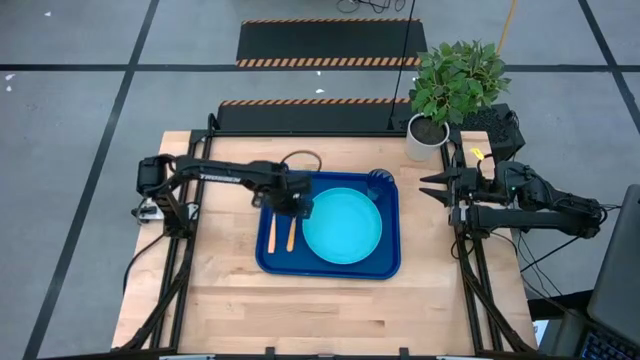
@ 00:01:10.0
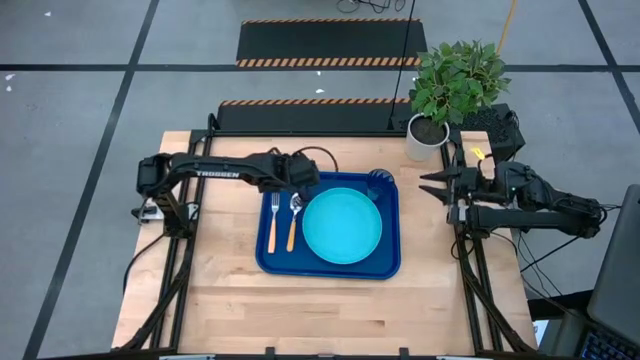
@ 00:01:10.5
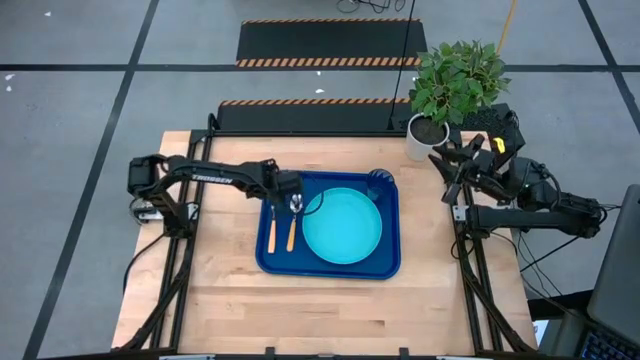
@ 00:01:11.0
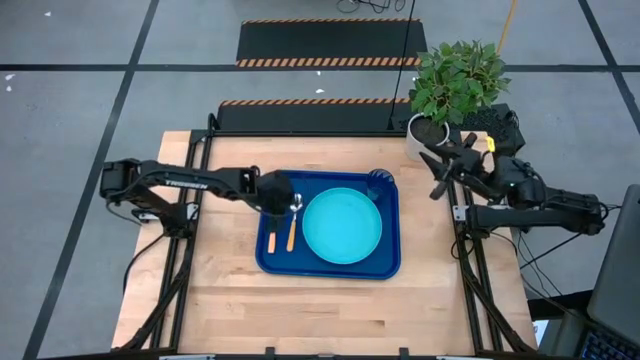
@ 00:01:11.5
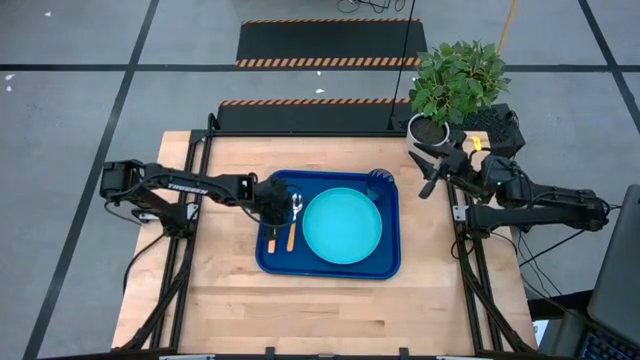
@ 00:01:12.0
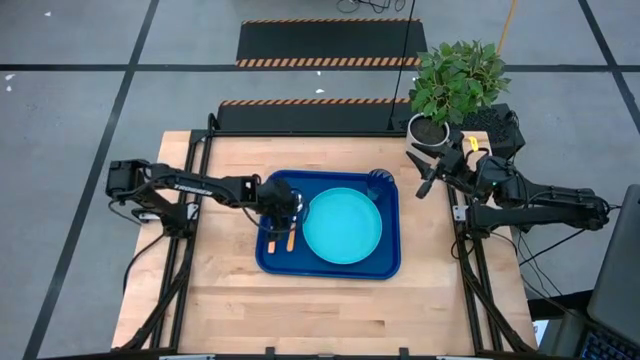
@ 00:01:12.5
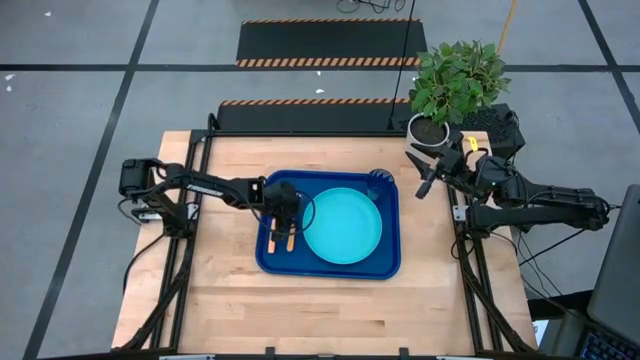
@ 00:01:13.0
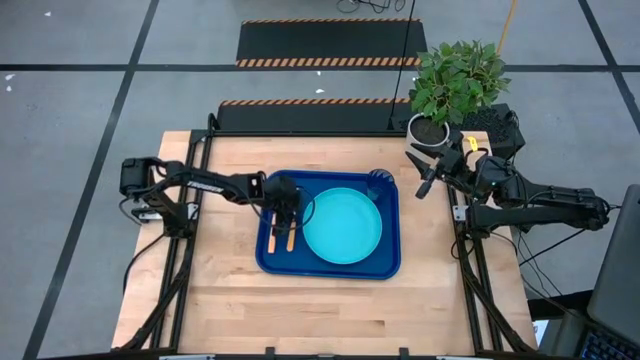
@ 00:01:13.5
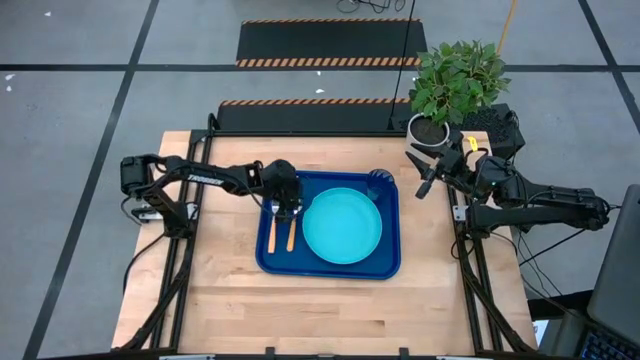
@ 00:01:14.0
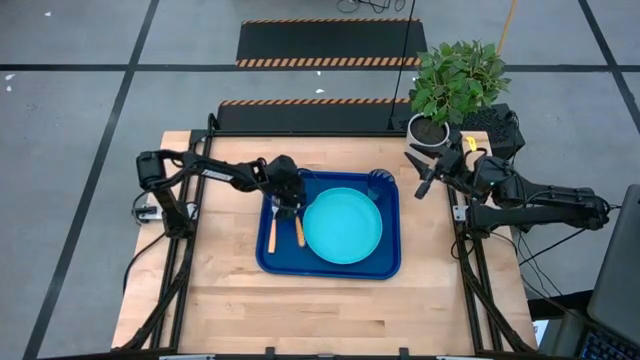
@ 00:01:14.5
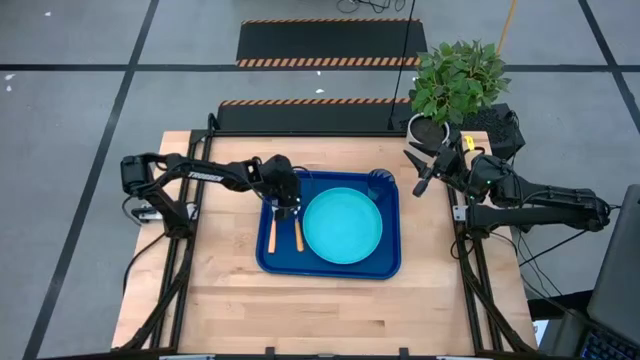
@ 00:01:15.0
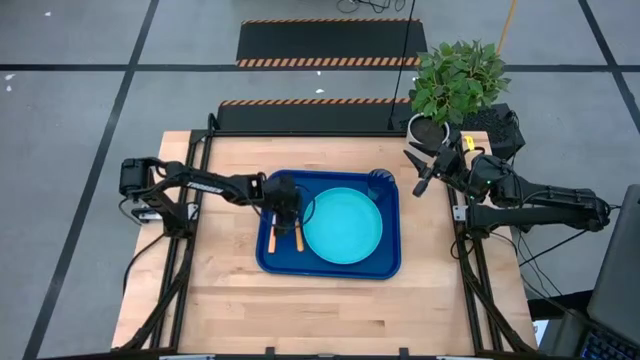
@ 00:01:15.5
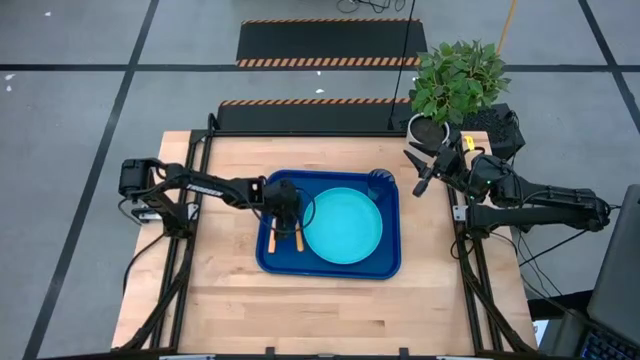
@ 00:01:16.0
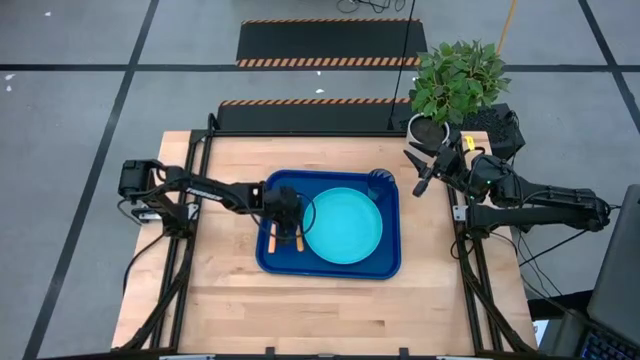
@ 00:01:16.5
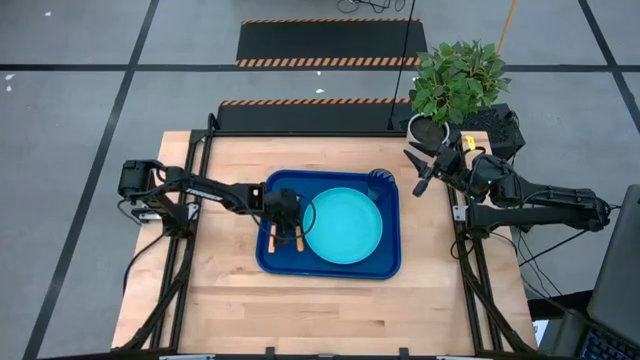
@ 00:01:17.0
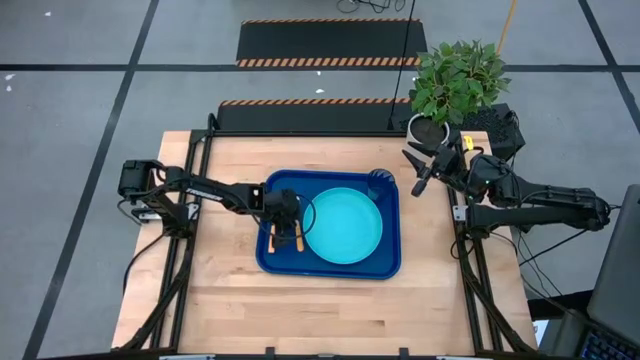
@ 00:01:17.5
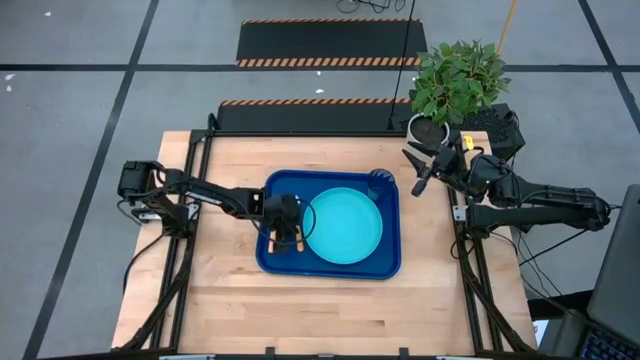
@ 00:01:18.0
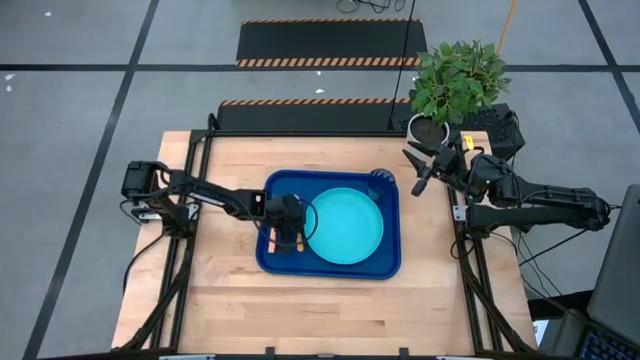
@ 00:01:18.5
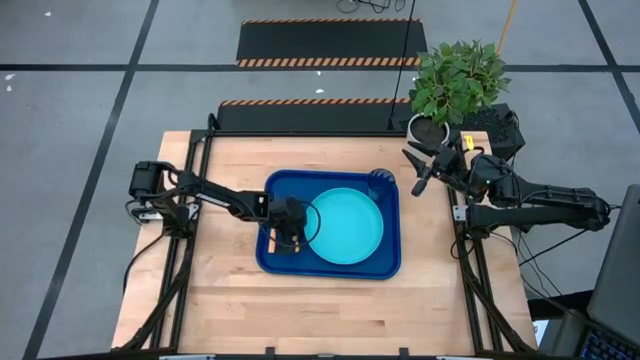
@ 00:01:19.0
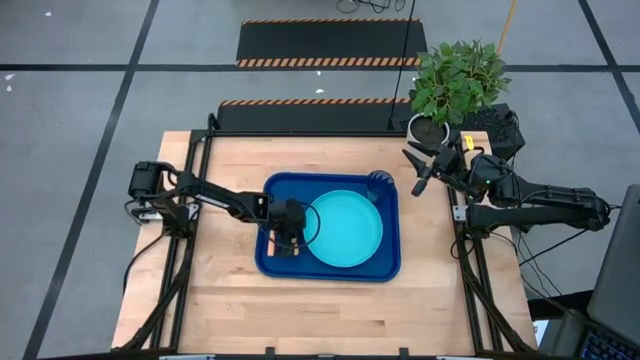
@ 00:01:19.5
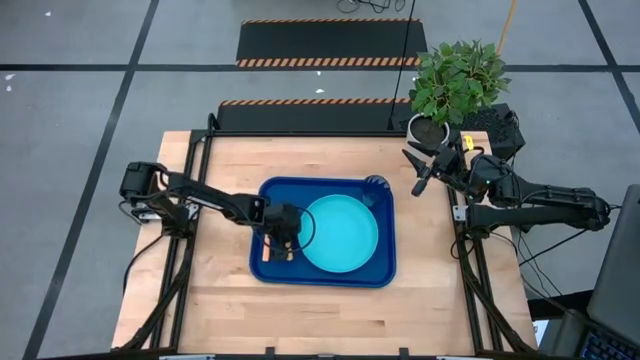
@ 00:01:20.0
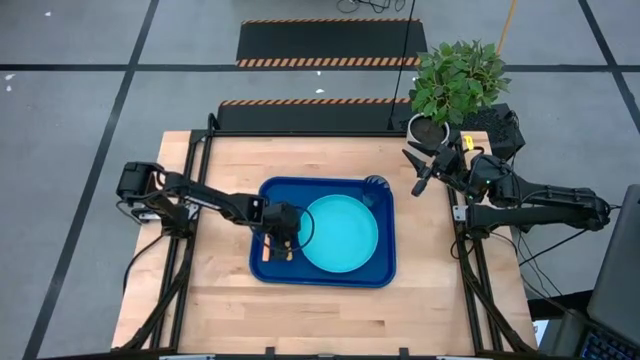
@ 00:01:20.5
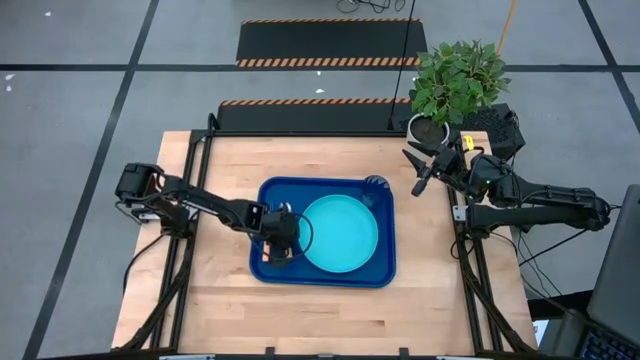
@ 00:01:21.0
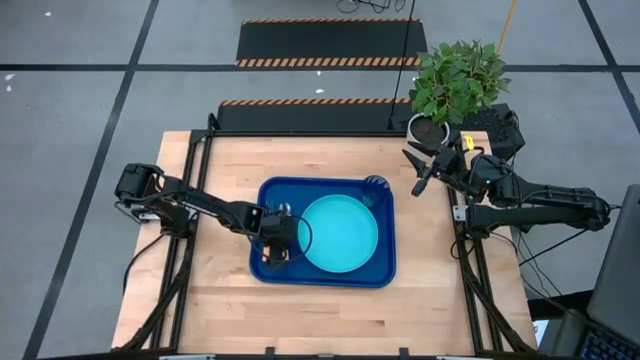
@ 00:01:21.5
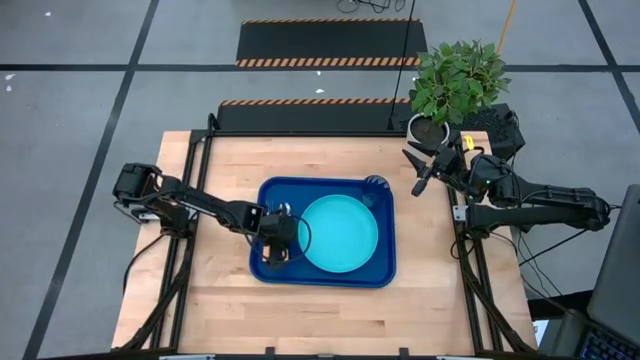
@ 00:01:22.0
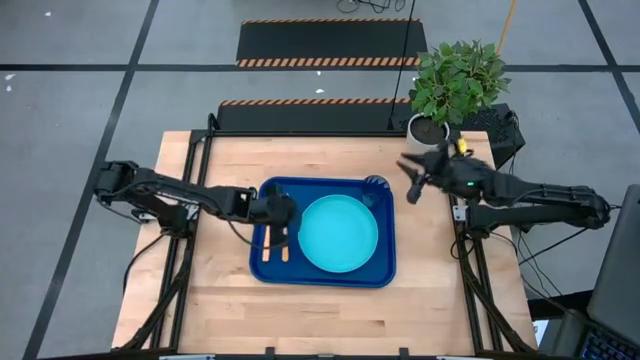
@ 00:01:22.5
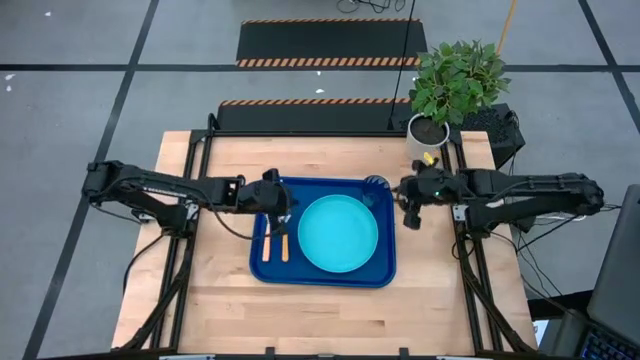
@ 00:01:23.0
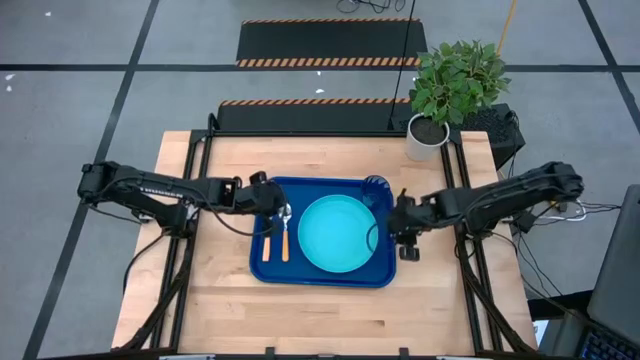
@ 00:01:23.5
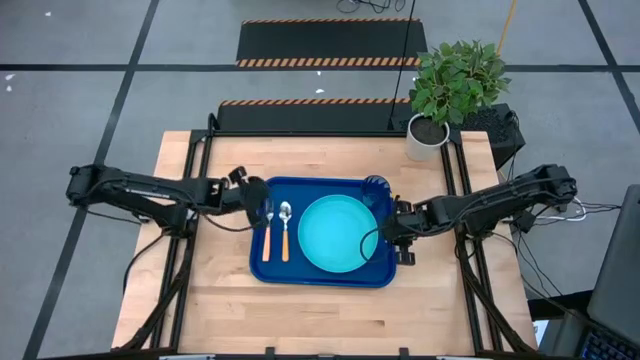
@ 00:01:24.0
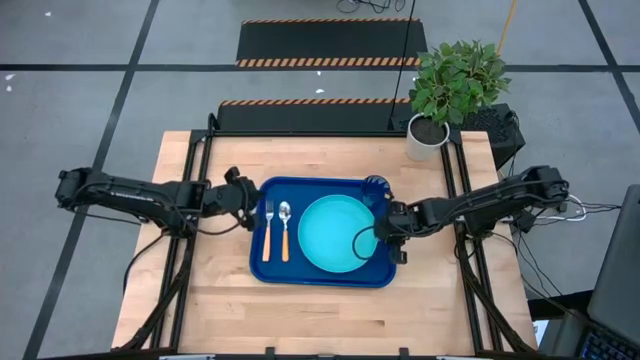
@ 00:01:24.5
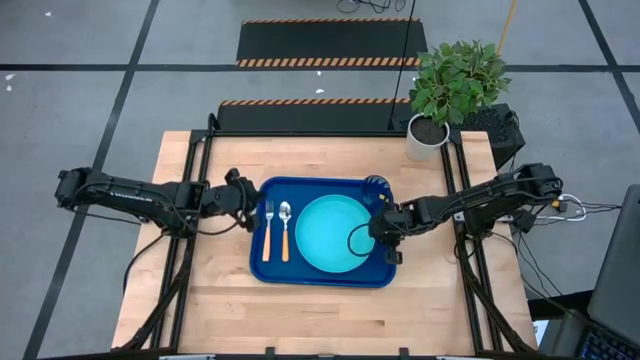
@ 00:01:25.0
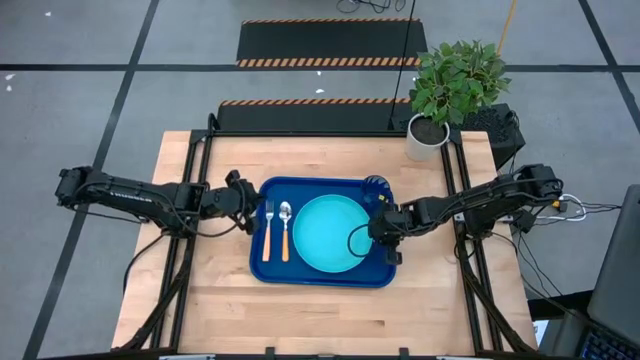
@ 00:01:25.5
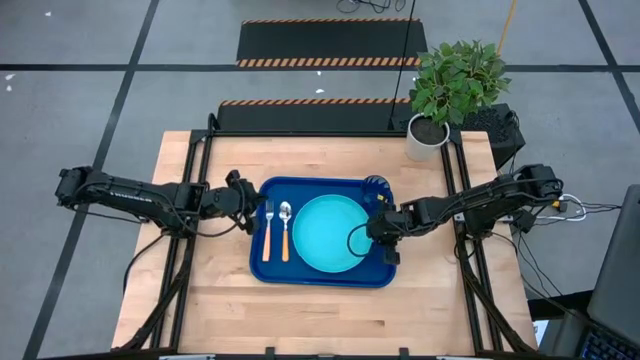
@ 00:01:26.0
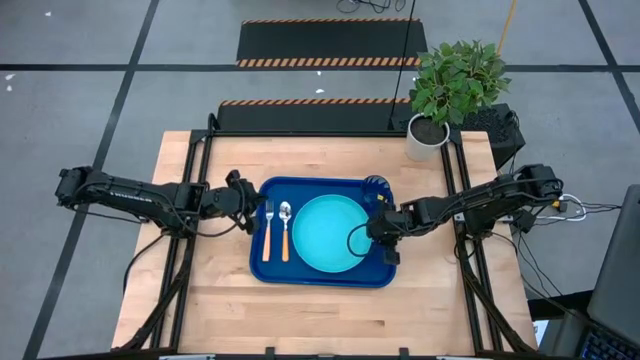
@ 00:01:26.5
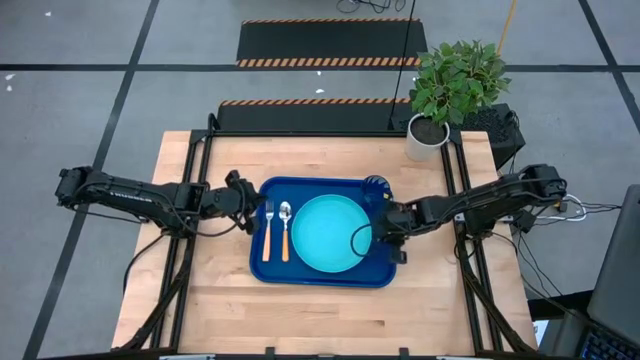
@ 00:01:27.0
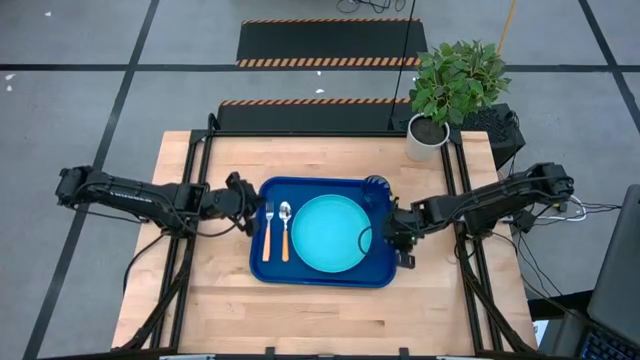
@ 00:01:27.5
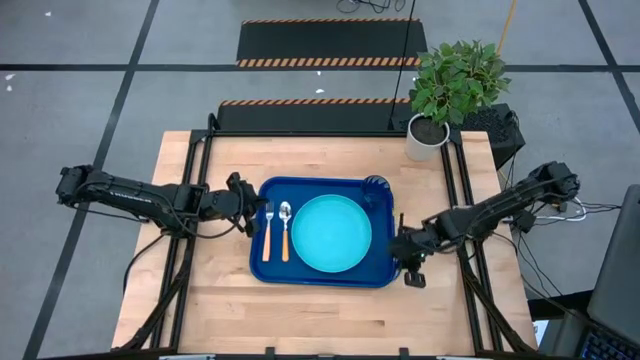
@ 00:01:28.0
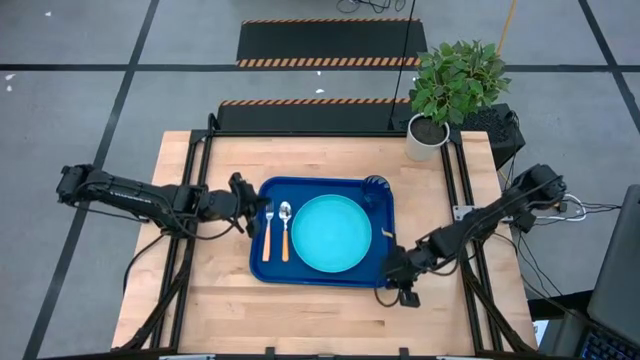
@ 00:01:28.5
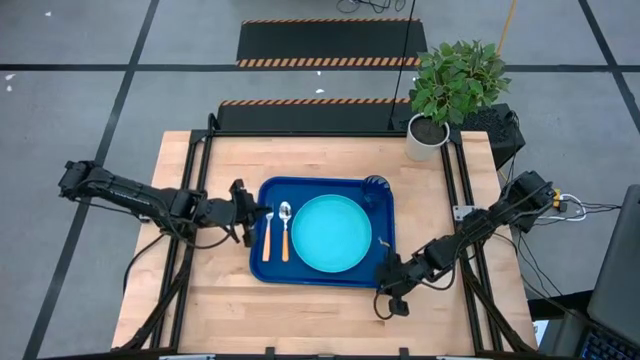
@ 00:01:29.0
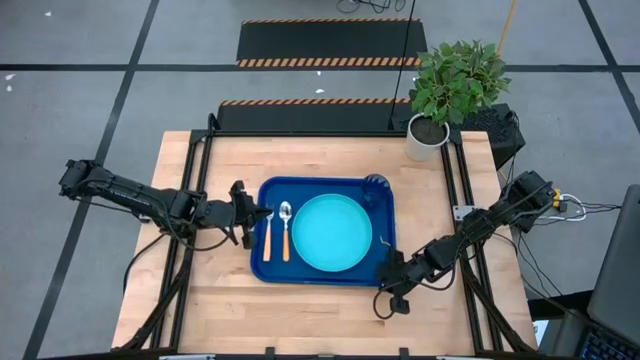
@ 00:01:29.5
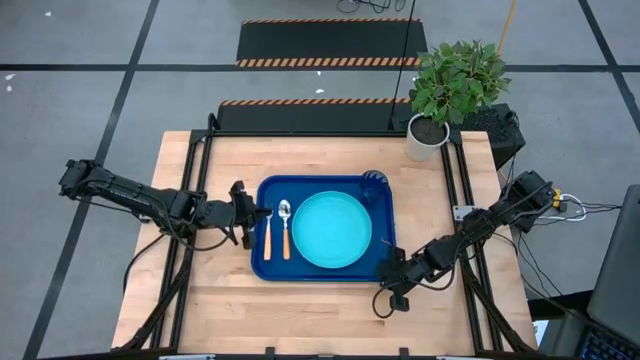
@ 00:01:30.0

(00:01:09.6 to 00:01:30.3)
Task: Pick and place plate/cup/fork/spoon on tray
Adjust the orange spoon, light blue plate, and blue tray

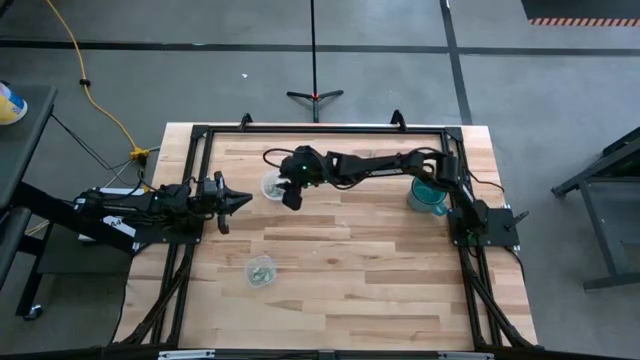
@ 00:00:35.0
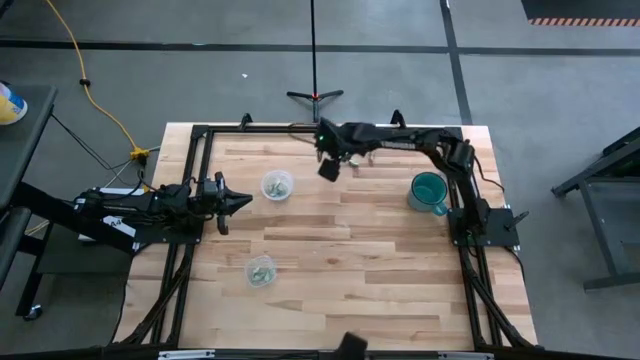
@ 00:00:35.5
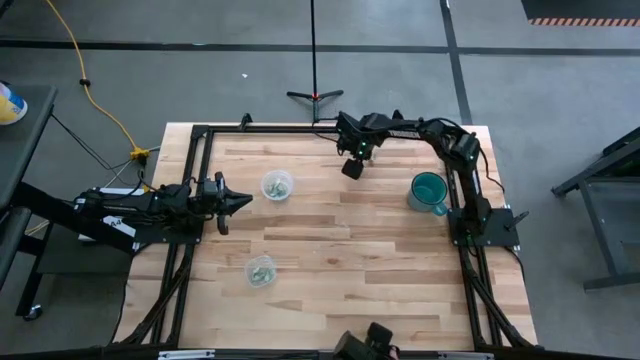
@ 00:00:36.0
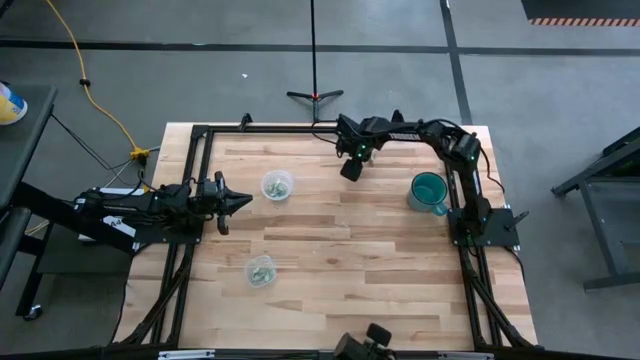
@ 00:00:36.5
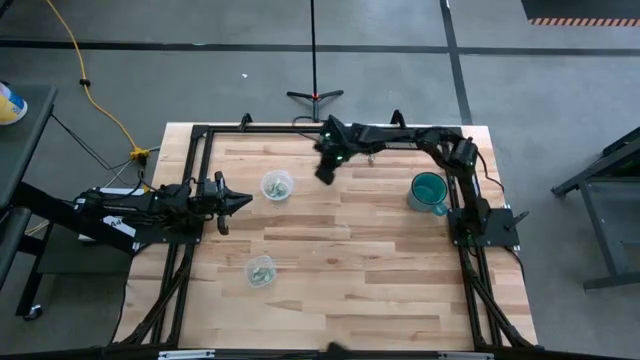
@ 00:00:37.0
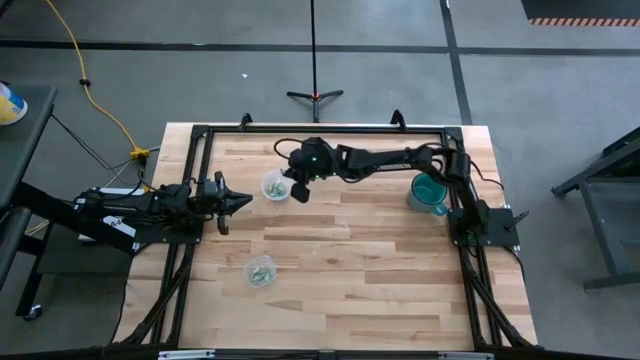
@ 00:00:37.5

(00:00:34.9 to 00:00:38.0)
Task: Pick and place items into bin
Put the white stevia packet into the top transparent bin
